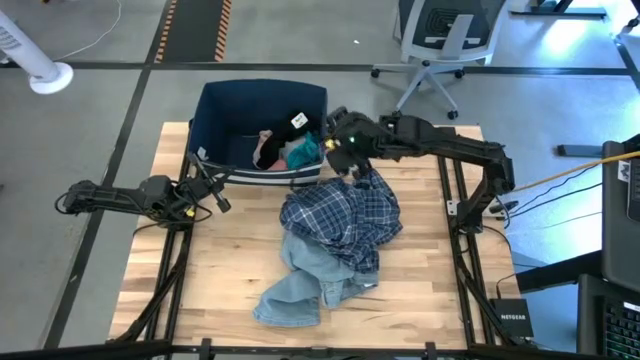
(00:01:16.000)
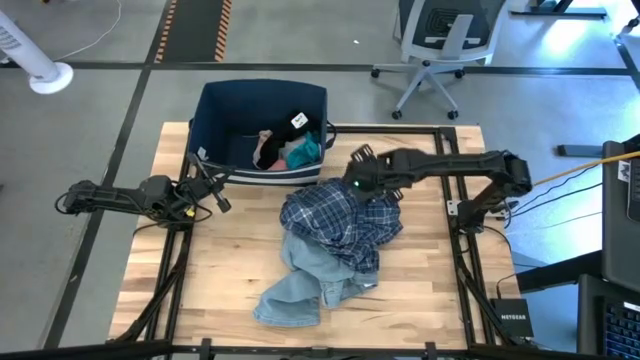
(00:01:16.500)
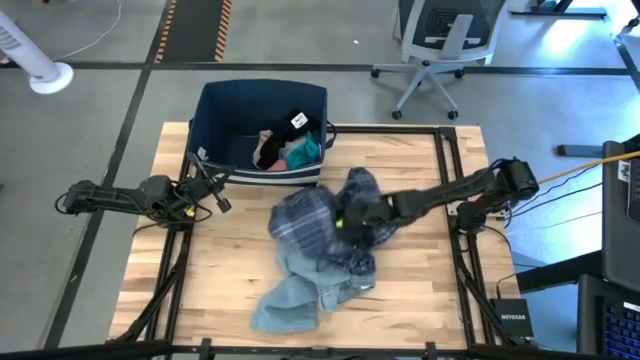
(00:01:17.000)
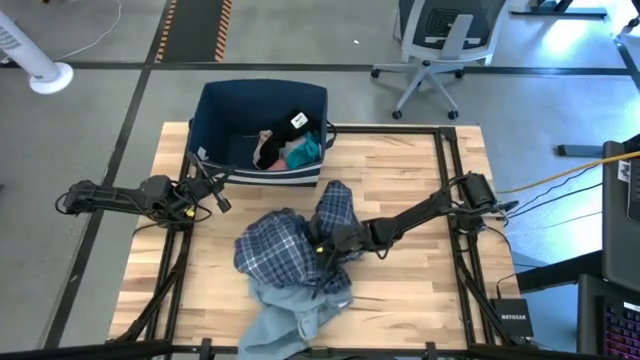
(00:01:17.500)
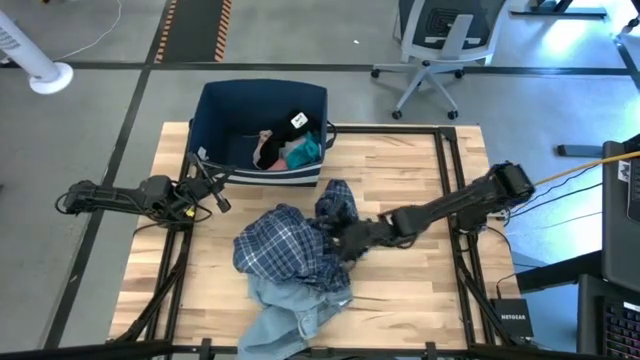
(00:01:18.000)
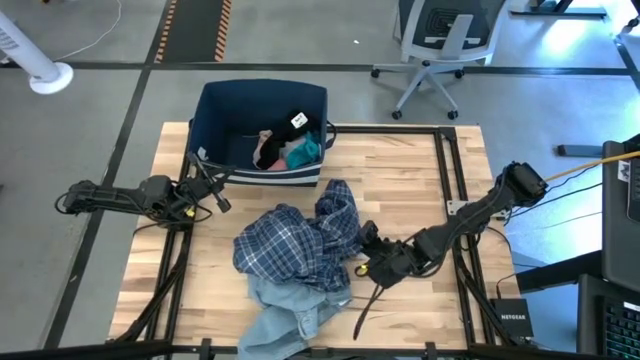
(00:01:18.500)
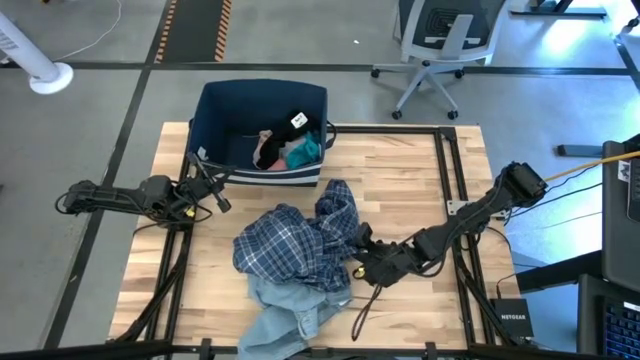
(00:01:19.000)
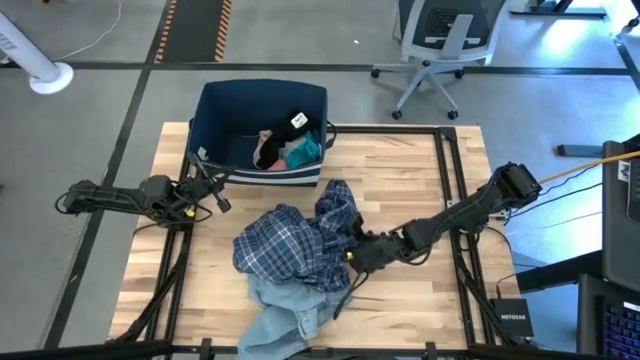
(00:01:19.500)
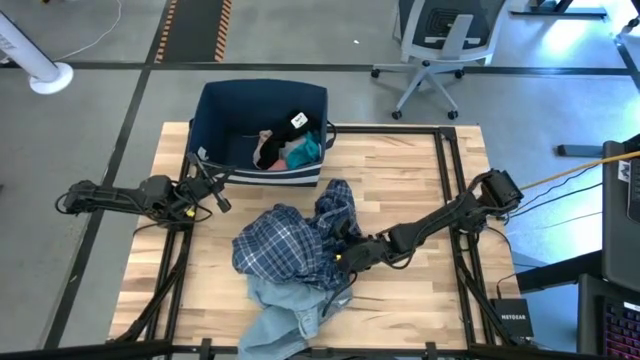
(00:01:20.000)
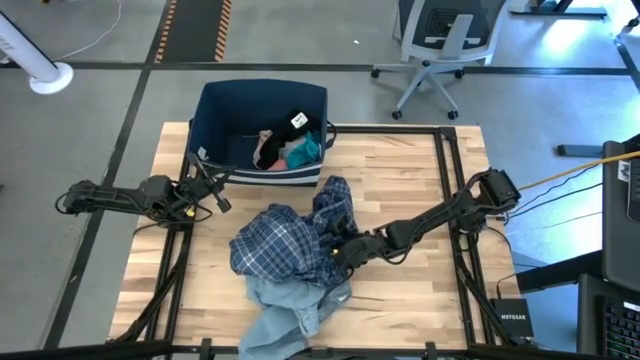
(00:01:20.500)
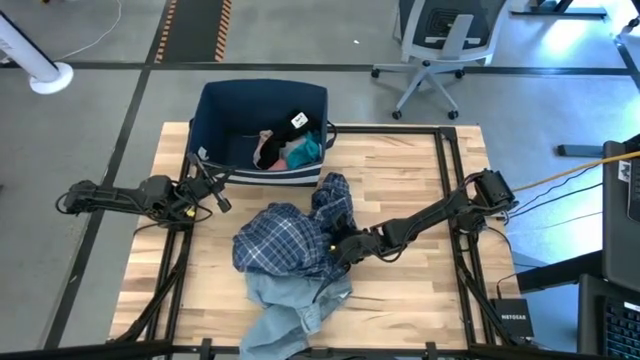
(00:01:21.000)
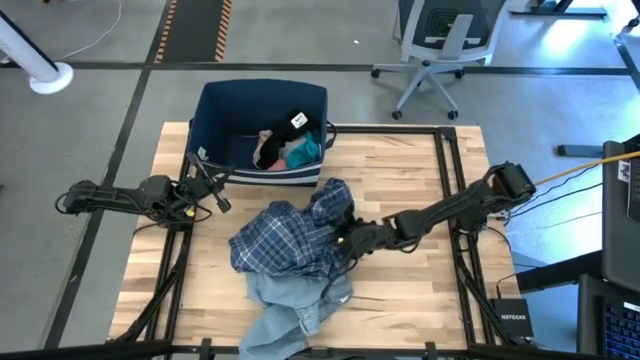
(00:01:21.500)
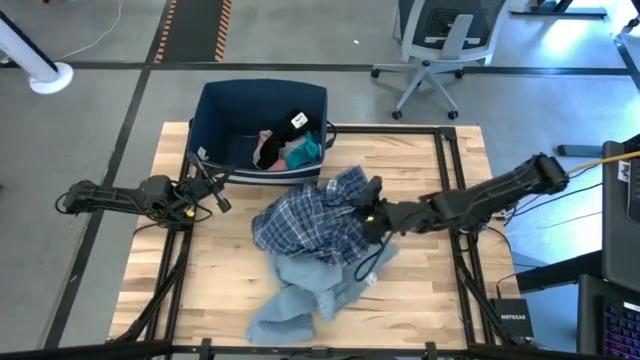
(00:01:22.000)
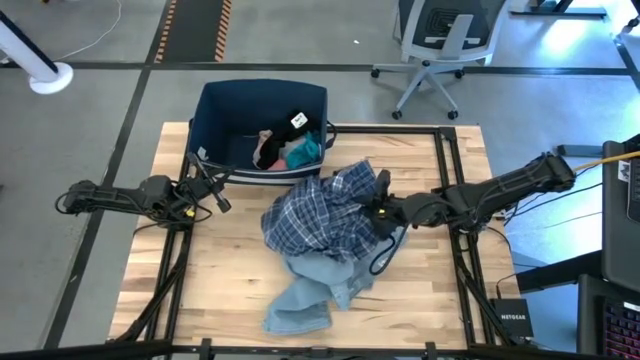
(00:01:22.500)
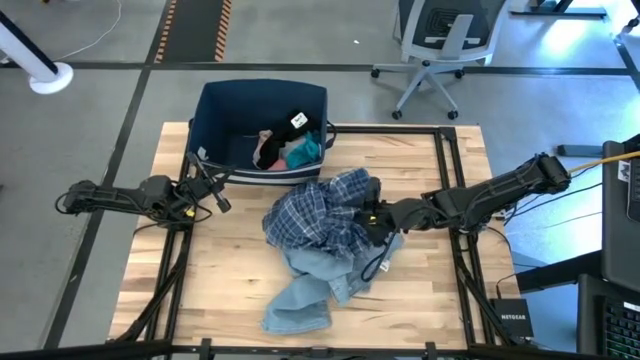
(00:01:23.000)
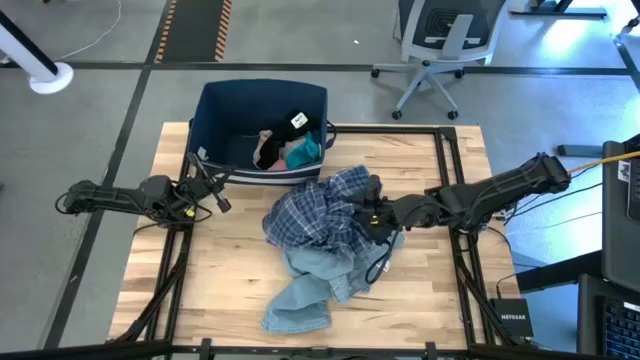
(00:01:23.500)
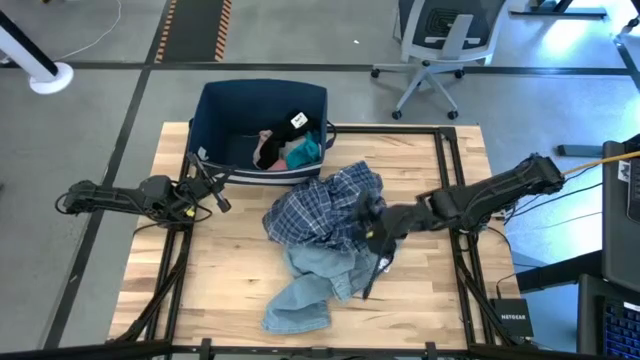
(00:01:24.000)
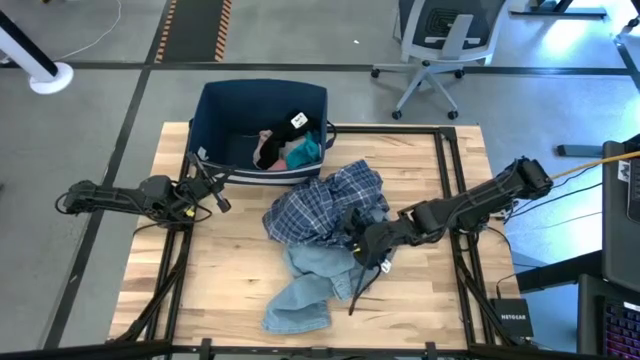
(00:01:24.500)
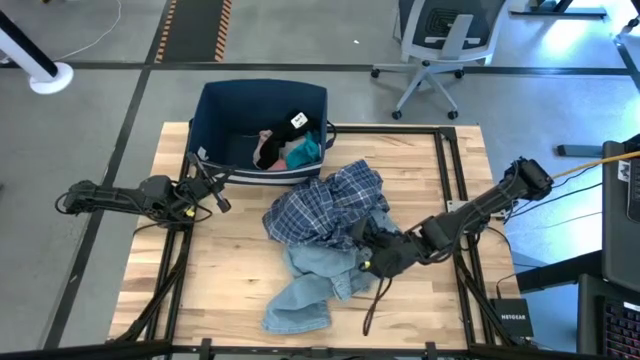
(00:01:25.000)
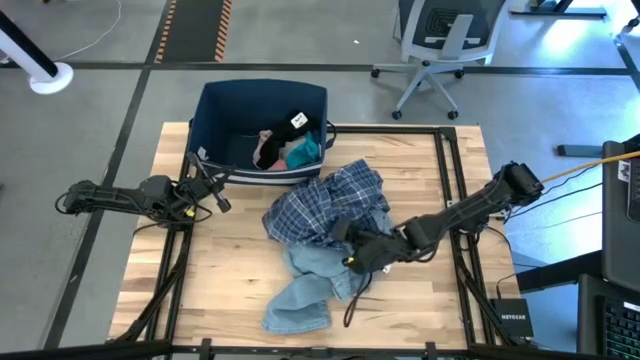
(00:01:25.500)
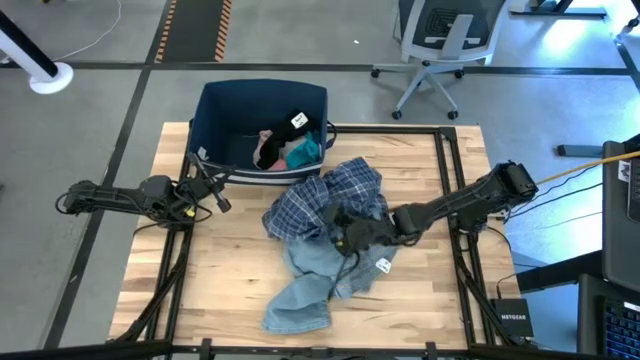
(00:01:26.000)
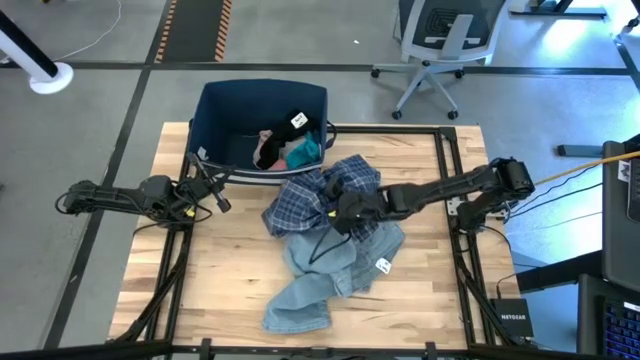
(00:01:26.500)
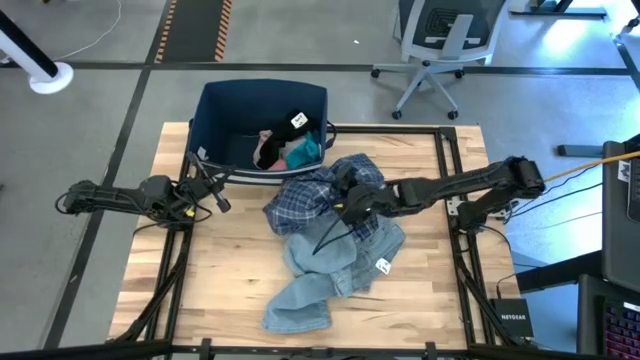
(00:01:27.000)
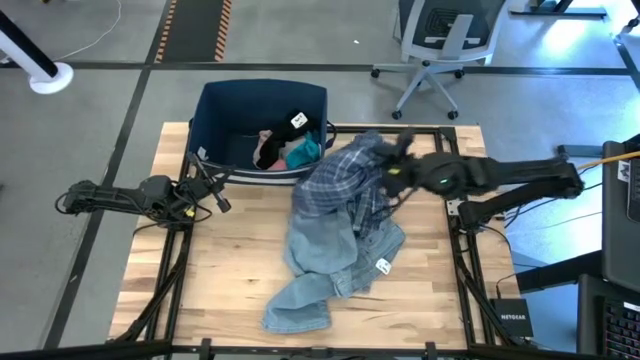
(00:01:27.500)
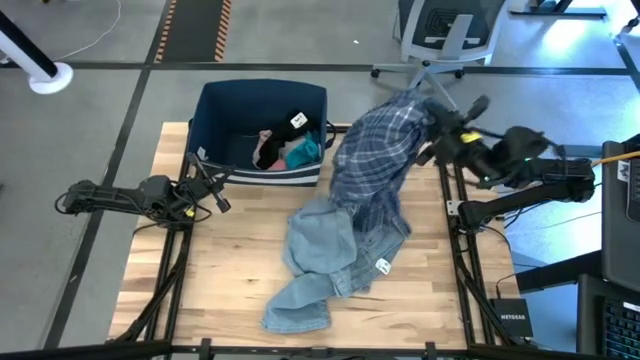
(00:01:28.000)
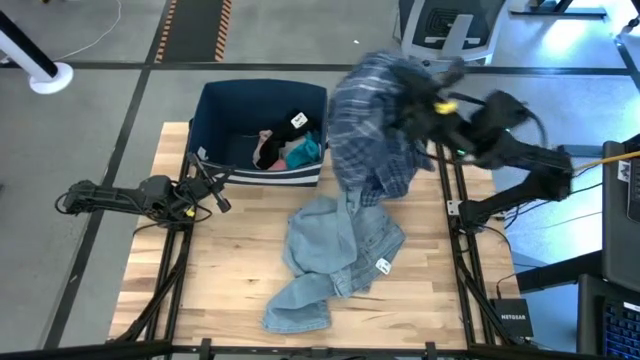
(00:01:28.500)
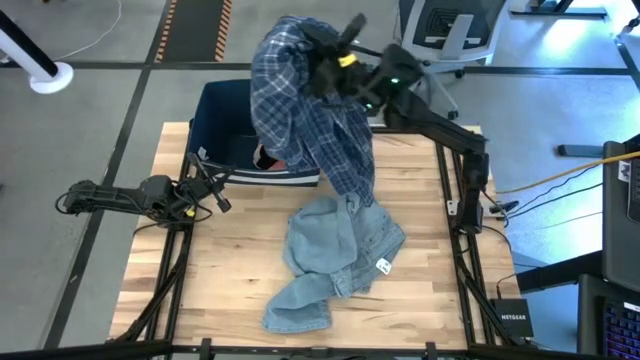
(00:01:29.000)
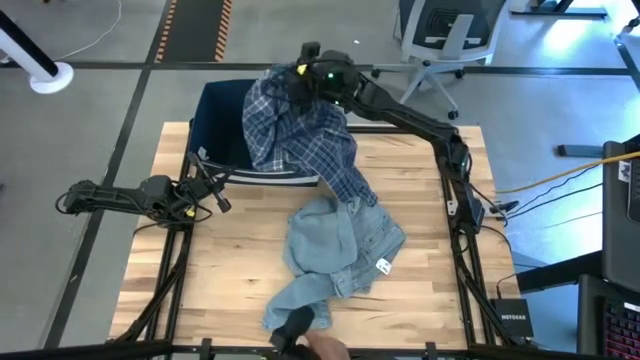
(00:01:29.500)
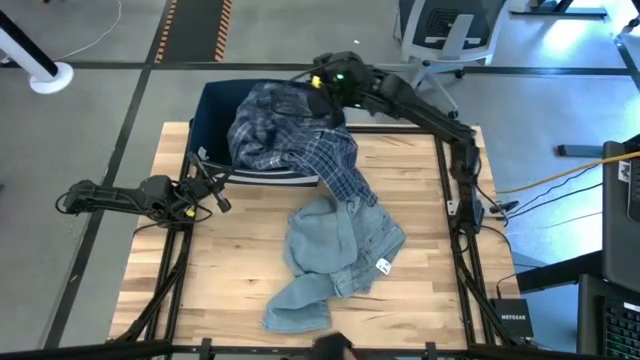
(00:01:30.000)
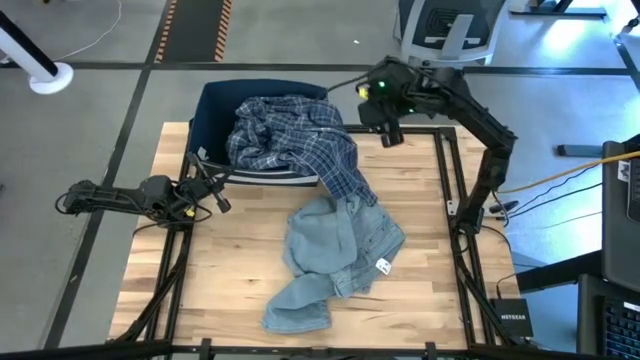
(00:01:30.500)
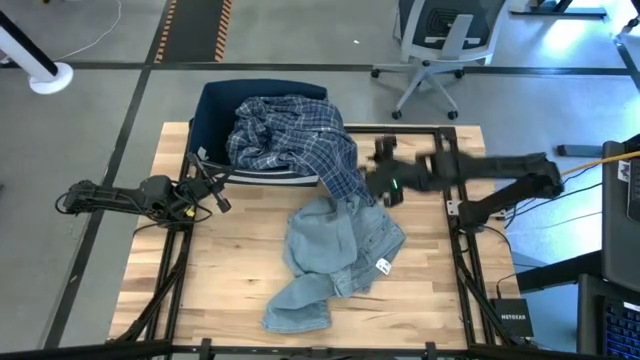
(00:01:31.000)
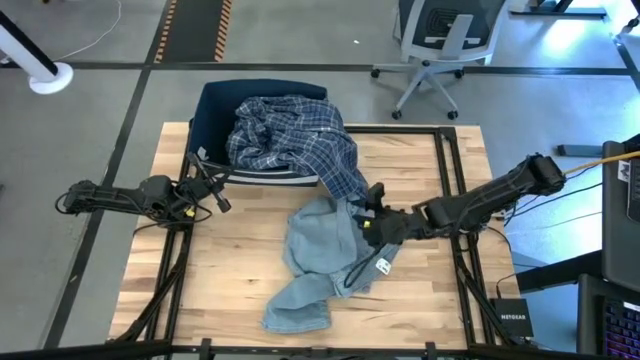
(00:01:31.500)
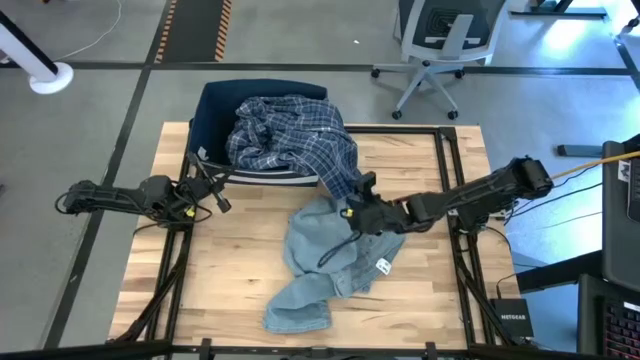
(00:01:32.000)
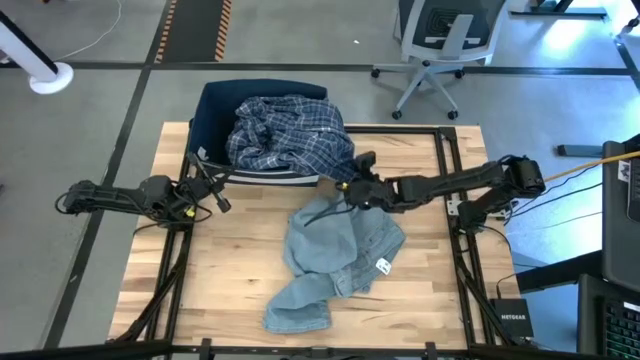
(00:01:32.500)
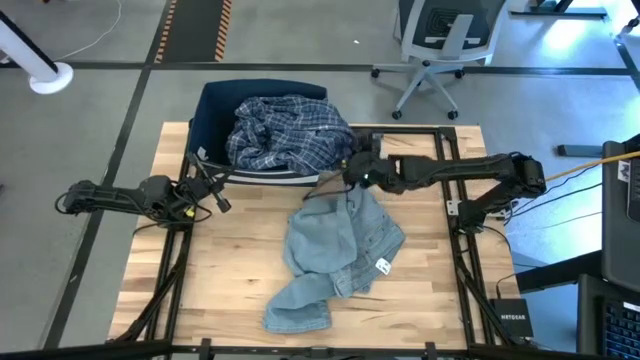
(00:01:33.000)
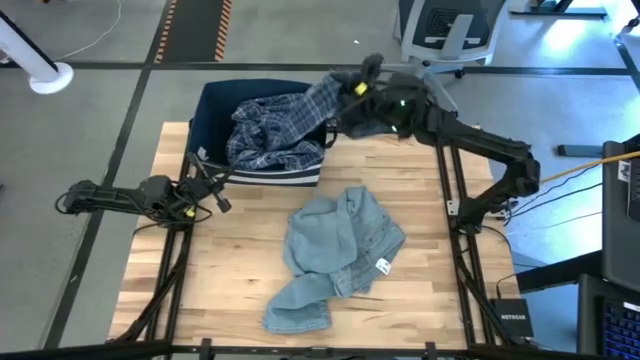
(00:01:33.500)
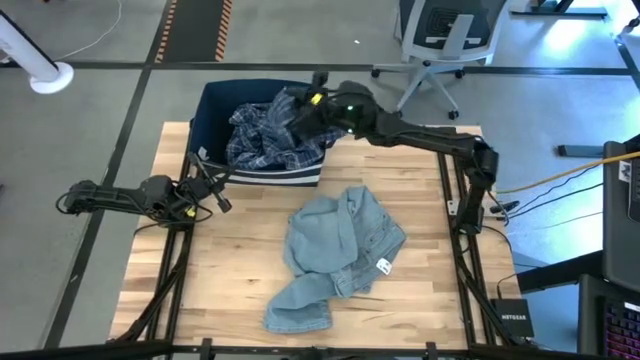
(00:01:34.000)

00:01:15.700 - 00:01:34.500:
Task: Sort clothes
Put the blue shirt into the blue laundry bin
